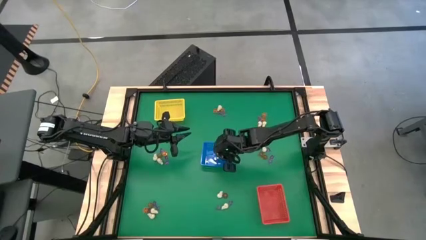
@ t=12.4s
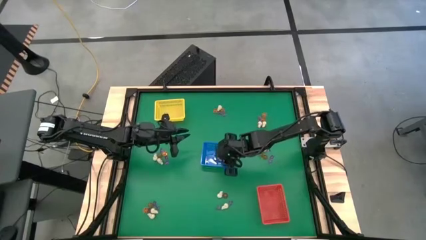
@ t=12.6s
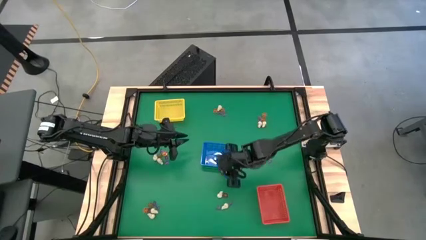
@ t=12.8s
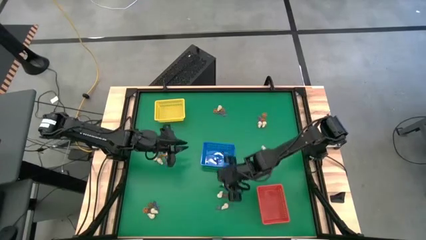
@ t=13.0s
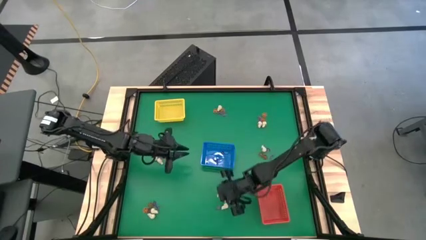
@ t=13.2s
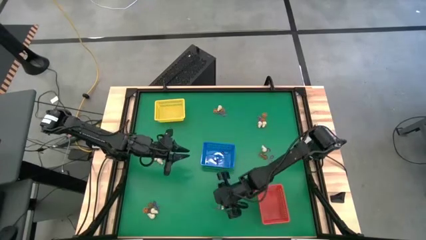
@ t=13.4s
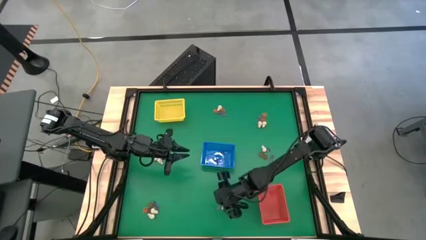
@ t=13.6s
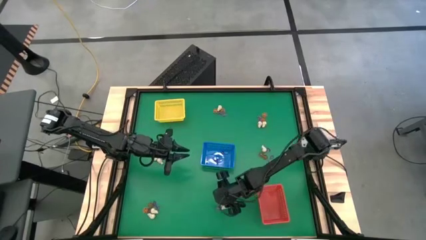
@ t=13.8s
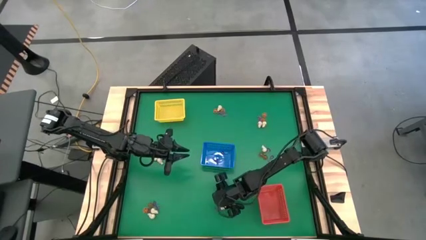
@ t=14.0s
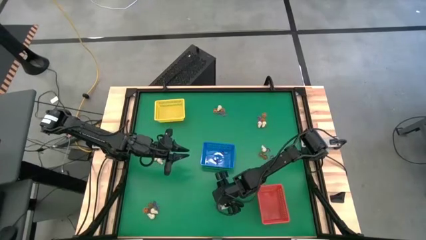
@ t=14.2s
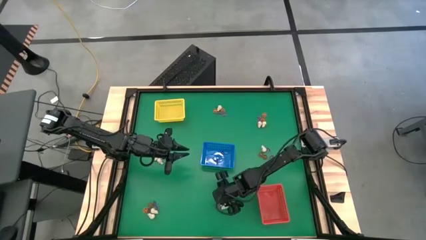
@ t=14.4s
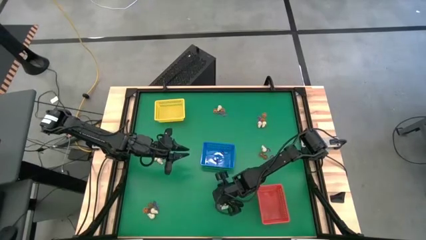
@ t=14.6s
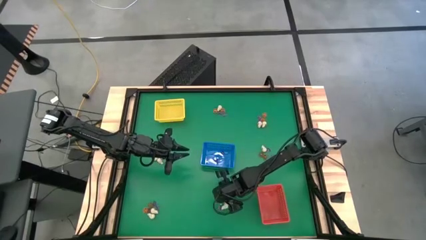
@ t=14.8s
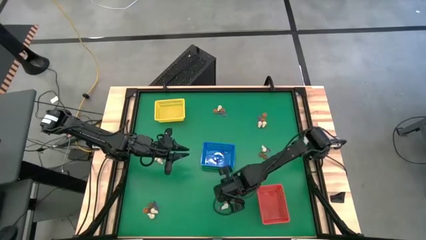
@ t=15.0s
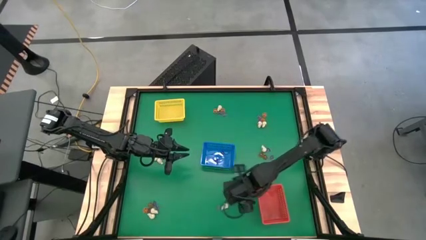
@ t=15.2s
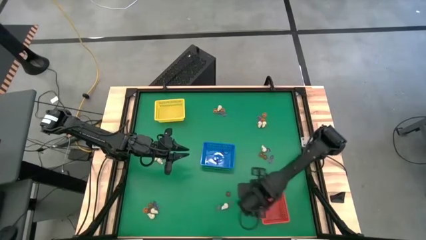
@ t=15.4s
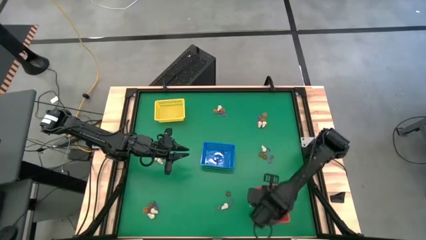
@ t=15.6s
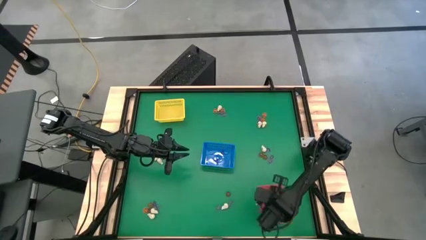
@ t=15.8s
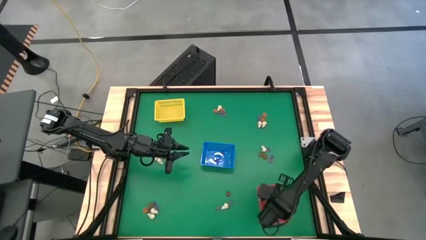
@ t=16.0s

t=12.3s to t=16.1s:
Task: Sort Halloween decoration
Put the skull toy into the red bin

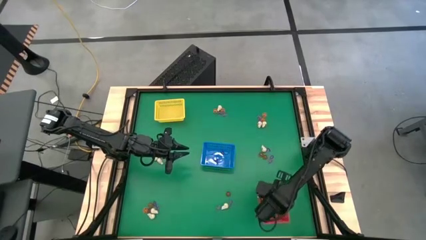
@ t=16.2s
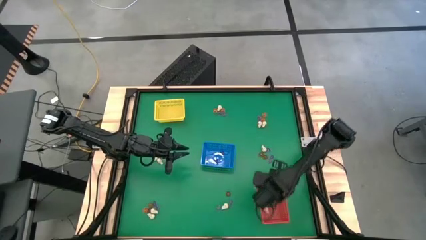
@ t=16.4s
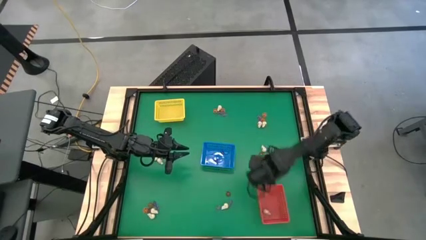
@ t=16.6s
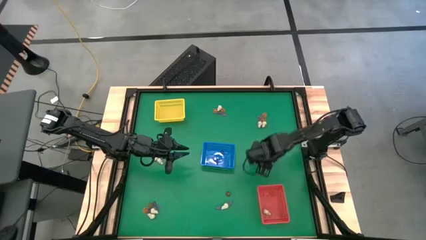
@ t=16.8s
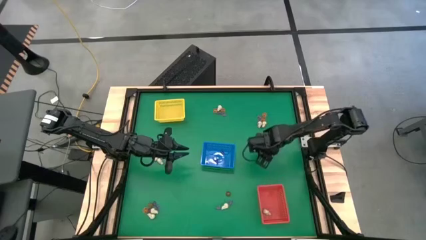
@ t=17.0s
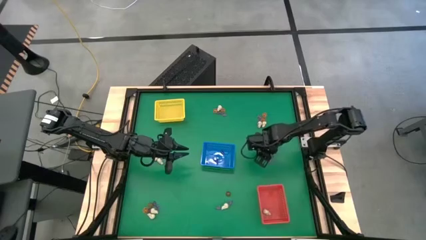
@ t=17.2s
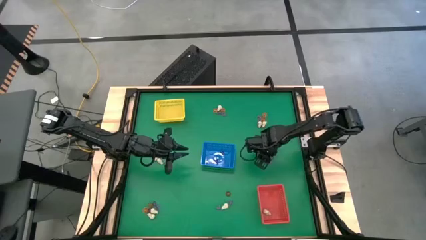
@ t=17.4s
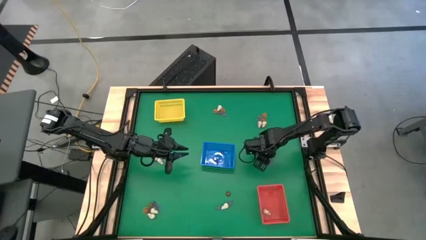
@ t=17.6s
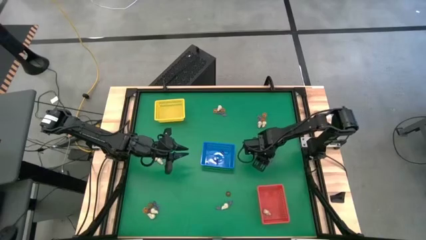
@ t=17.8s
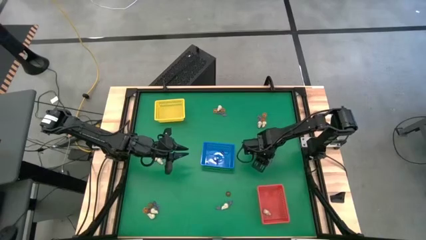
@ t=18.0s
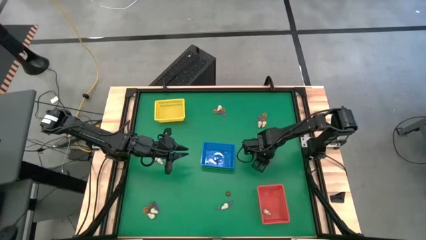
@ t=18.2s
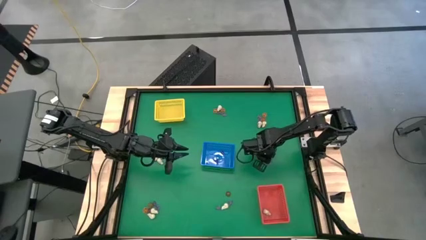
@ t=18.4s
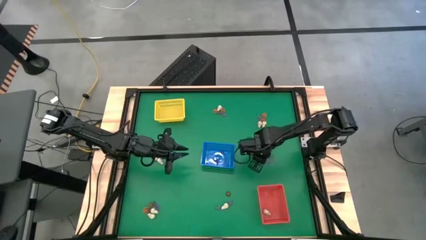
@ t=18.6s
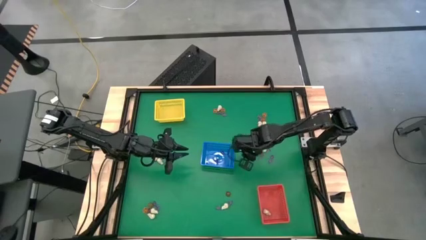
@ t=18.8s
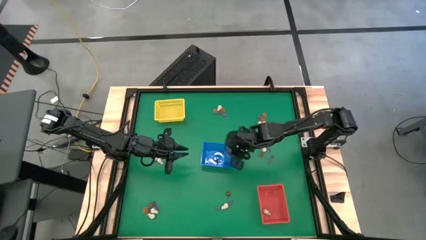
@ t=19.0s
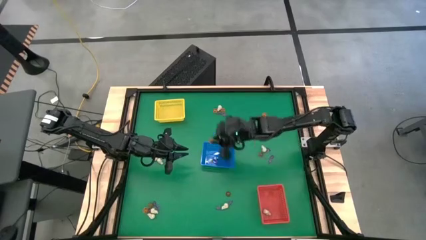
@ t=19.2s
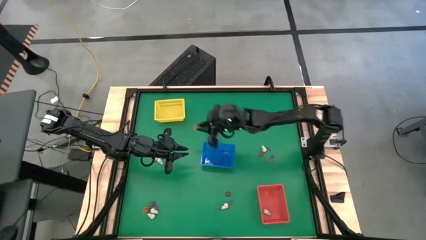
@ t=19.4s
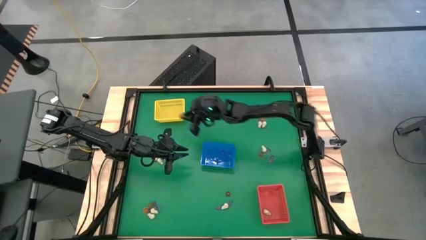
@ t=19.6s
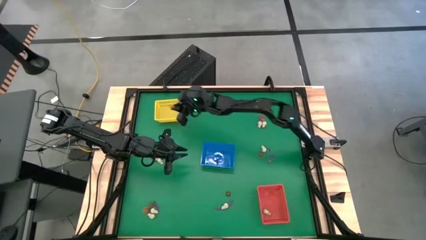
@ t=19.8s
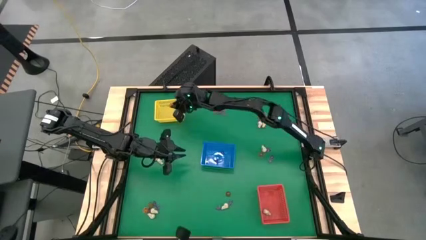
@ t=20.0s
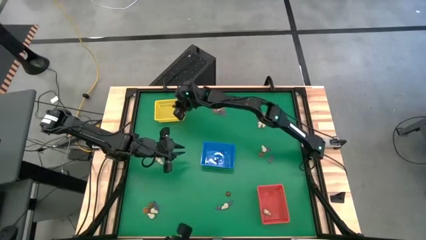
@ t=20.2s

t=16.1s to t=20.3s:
Put the pumpkin toy into the yellow bin

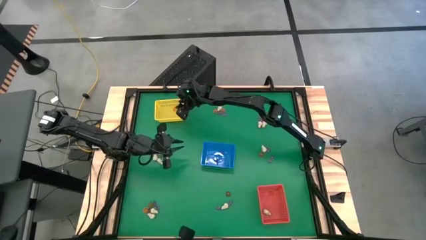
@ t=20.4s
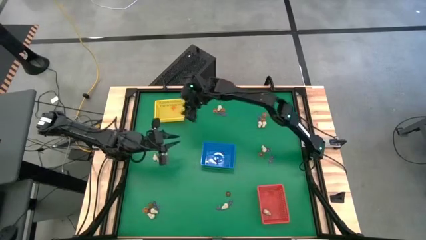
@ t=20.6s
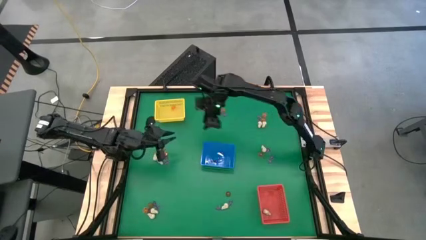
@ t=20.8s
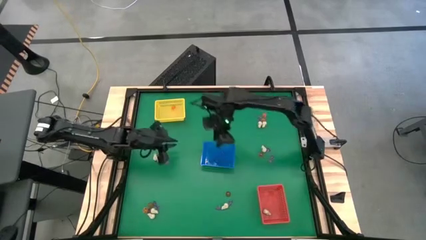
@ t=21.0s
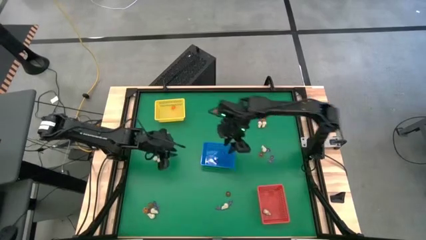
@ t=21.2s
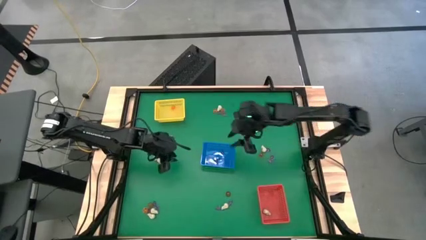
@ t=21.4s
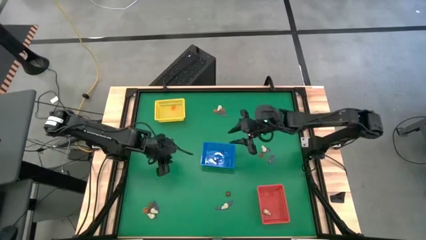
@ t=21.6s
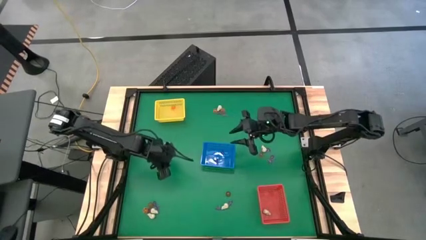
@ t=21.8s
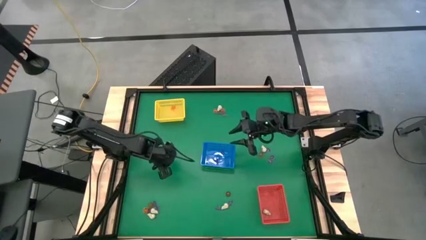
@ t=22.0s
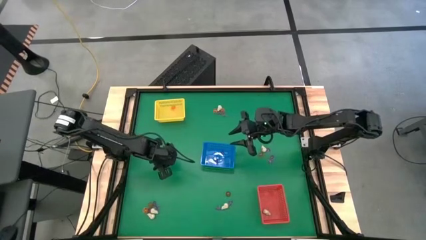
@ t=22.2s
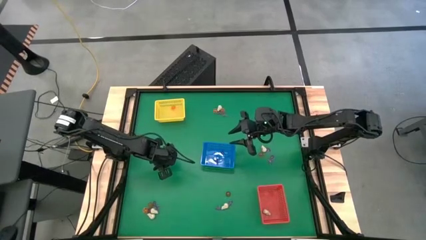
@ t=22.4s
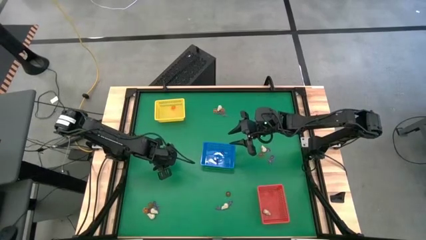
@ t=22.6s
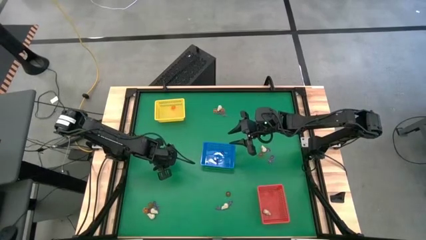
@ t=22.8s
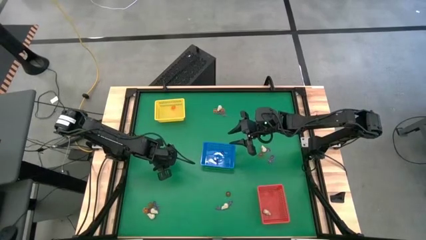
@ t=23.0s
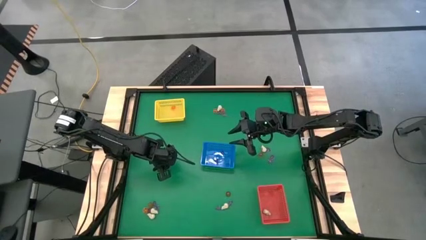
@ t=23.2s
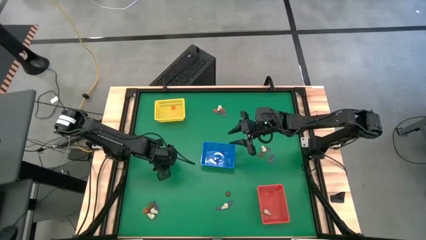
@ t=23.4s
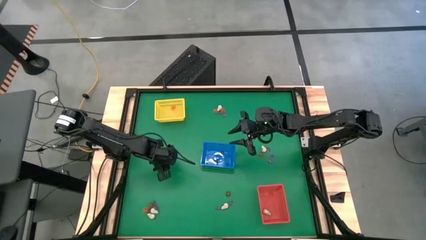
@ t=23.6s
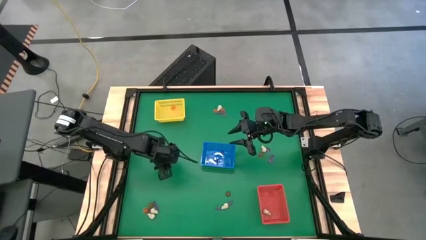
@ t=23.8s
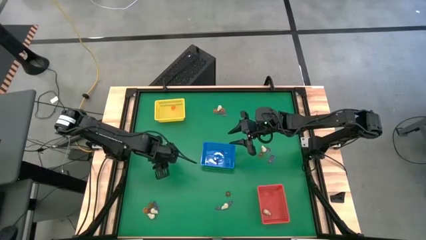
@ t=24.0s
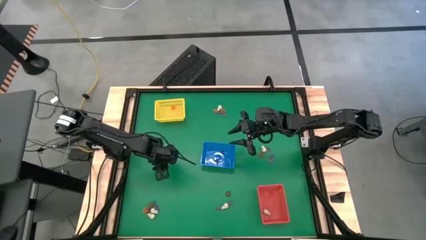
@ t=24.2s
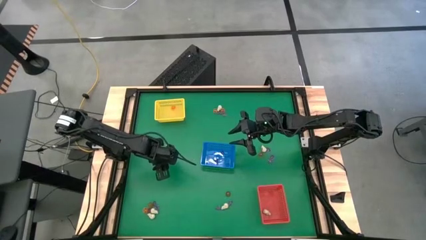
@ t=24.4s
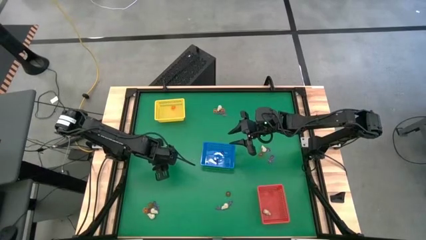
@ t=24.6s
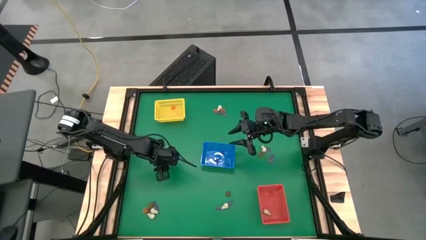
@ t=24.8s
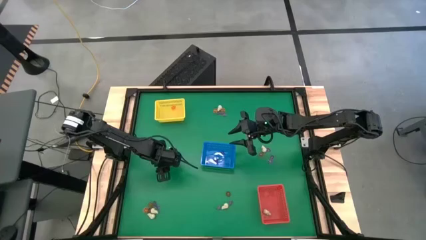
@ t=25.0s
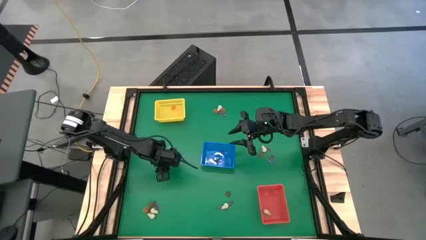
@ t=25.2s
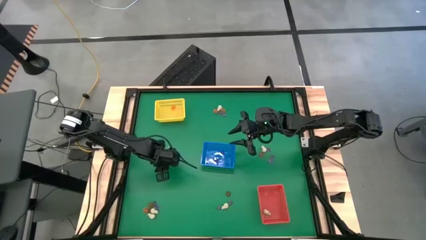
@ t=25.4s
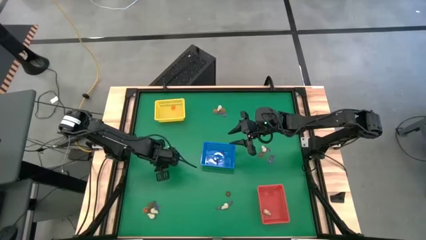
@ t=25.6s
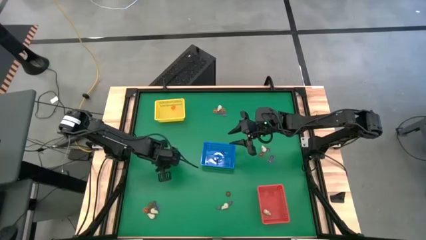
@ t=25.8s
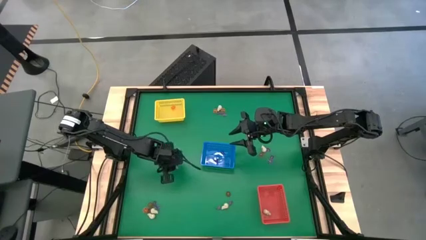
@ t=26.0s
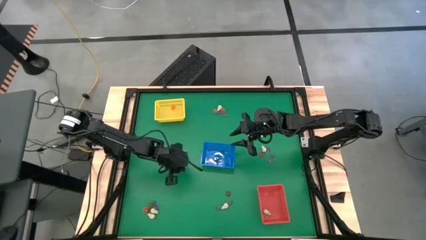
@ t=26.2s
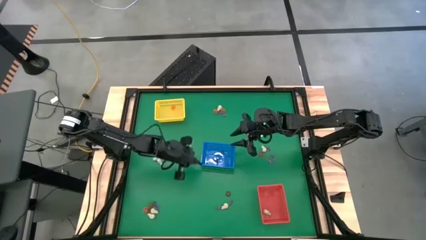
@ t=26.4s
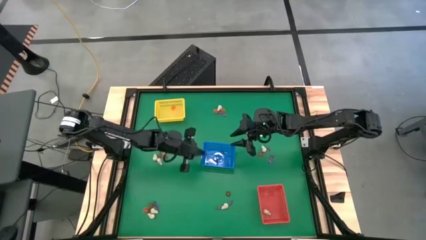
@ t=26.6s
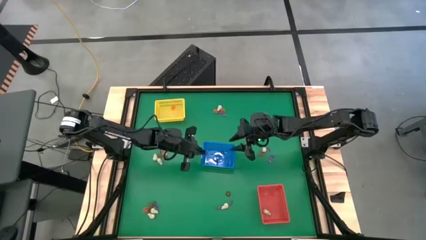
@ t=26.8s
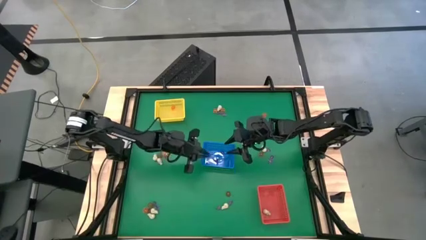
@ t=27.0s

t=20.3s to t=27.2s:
Put the witch hat toy into the blue bin

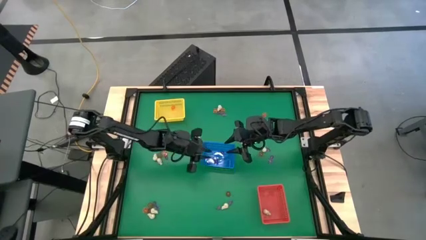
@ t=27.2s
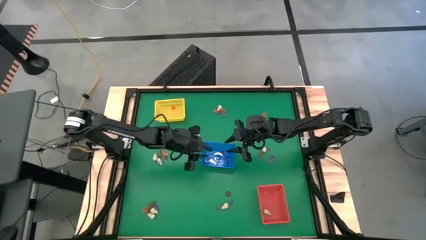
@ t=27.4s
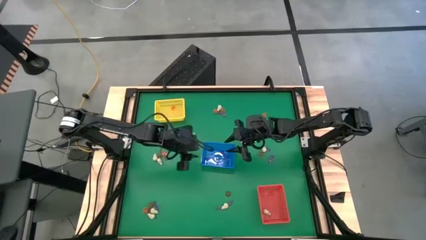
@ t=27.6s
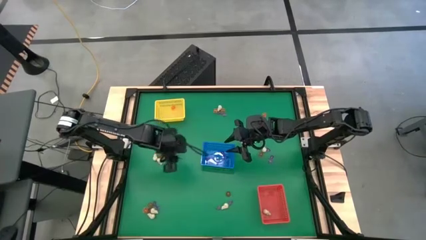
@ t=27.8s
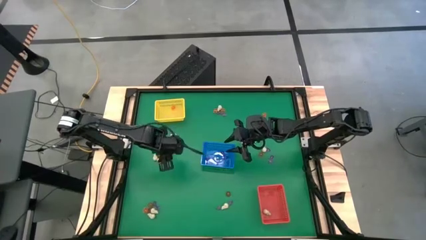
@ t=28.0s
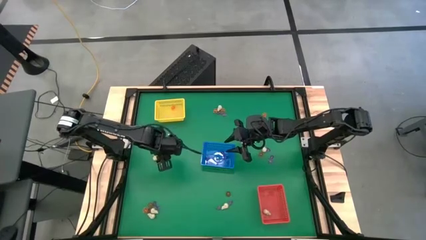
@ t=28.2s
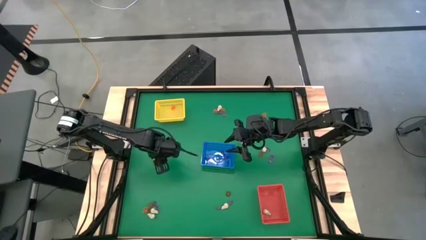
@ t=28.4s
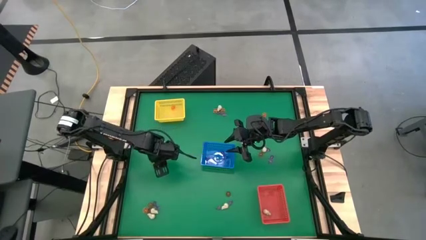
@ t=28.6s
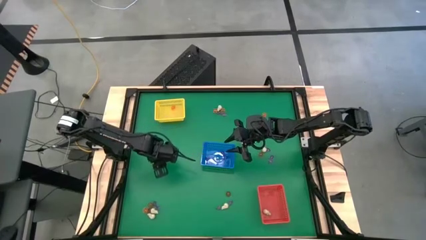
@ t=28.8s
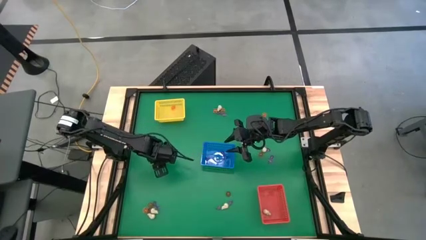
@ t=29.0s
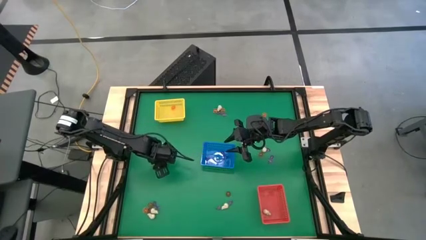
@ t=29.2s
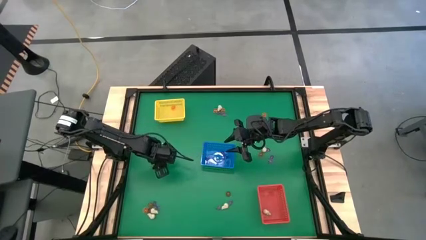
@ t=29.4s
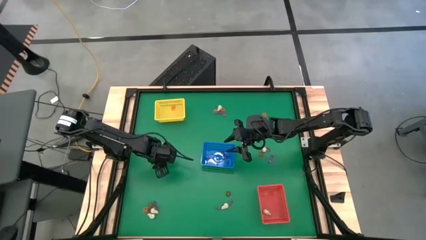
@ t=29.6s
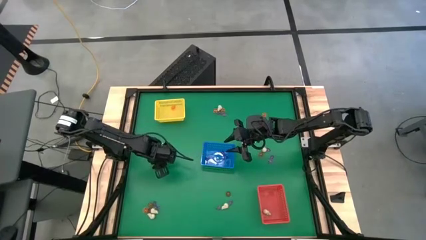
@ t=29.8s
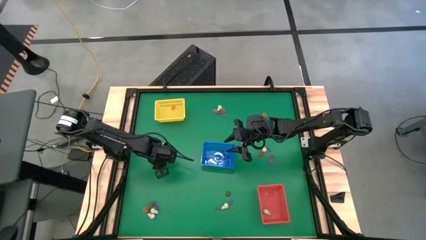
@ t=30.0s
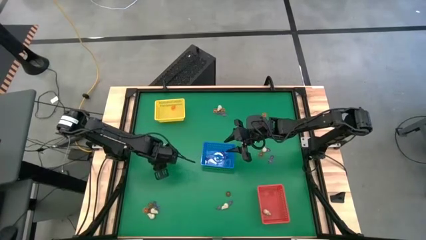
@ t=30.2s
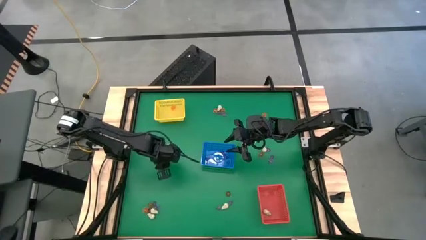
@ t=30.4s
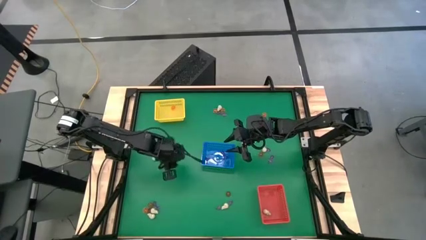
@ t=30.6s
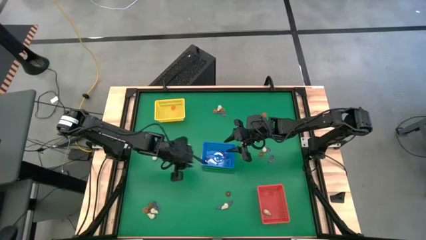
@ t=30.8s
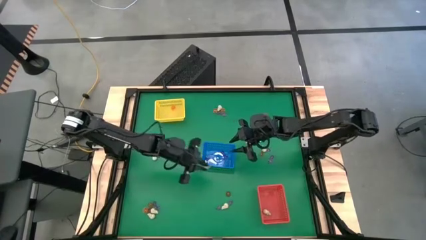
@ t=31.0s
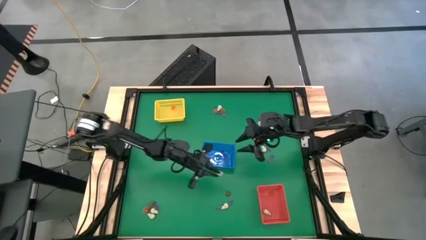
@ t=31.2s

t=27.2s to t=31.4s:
Put the skull toy into the red bin
